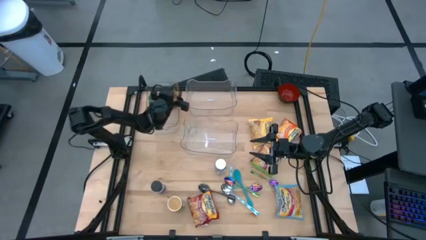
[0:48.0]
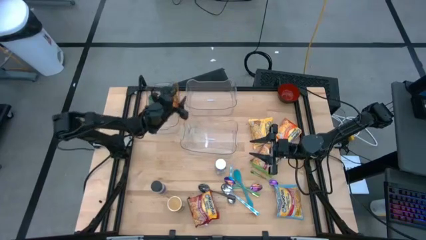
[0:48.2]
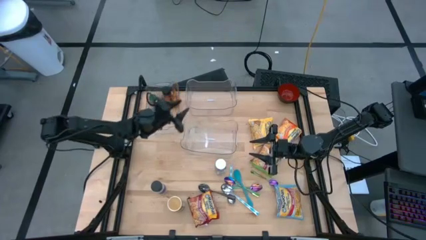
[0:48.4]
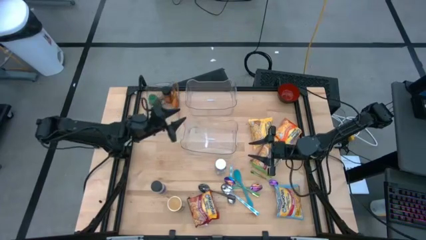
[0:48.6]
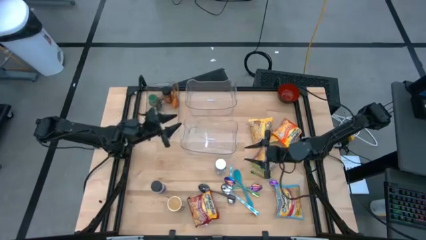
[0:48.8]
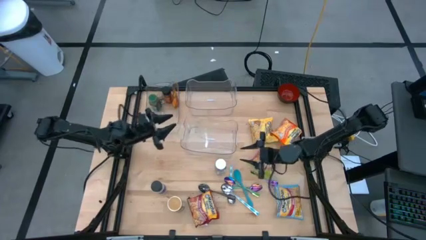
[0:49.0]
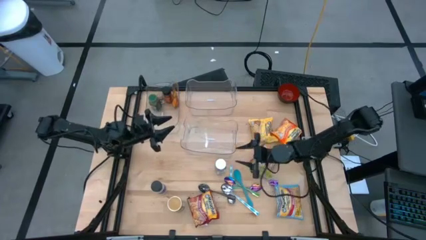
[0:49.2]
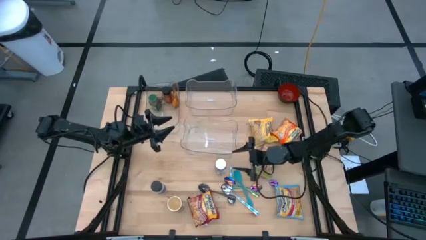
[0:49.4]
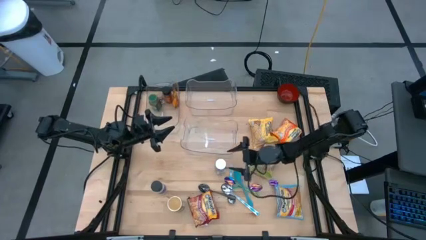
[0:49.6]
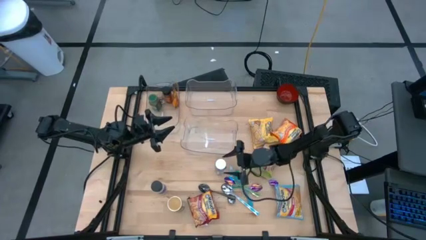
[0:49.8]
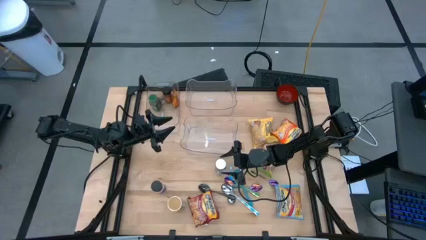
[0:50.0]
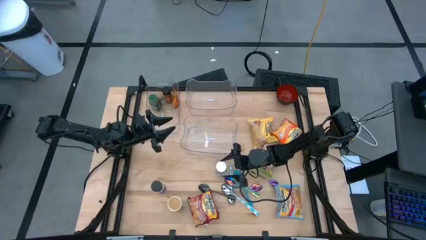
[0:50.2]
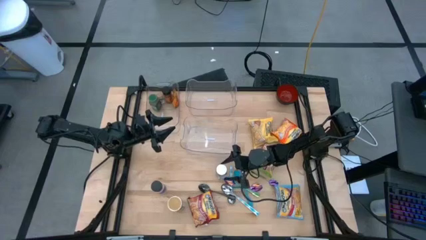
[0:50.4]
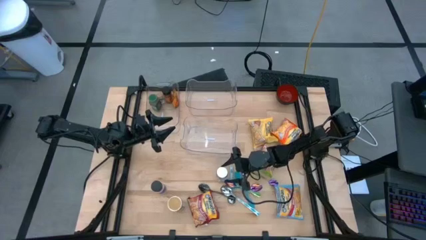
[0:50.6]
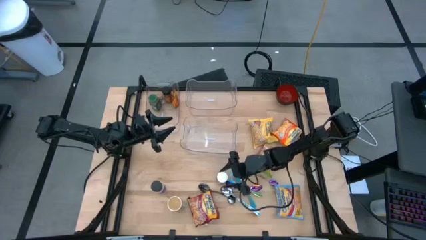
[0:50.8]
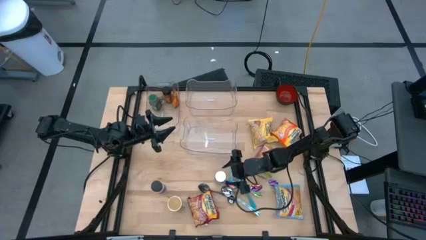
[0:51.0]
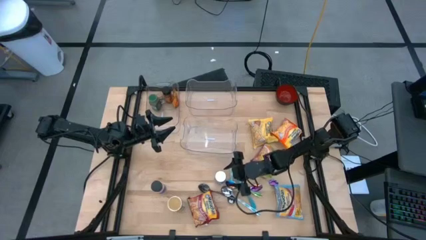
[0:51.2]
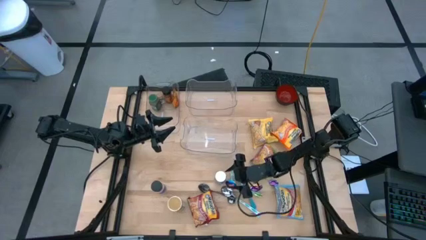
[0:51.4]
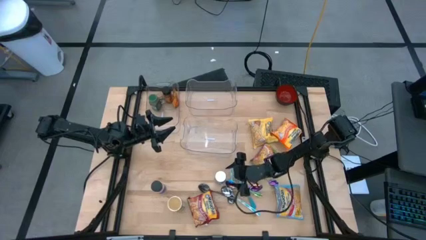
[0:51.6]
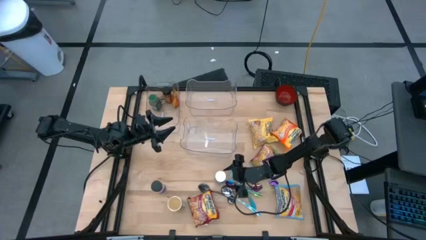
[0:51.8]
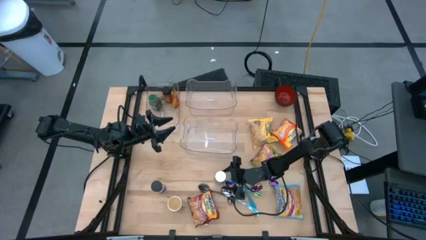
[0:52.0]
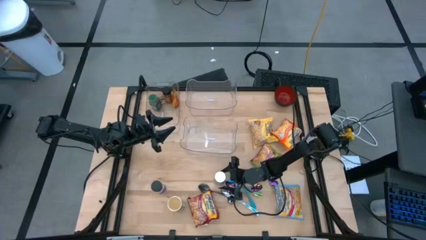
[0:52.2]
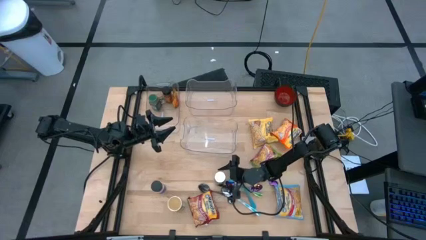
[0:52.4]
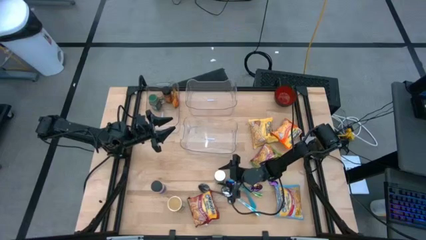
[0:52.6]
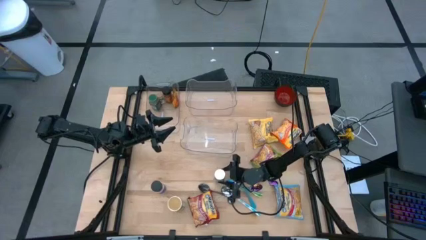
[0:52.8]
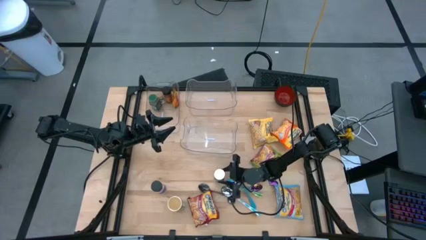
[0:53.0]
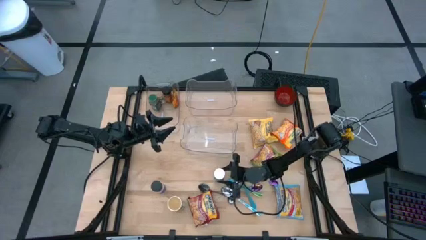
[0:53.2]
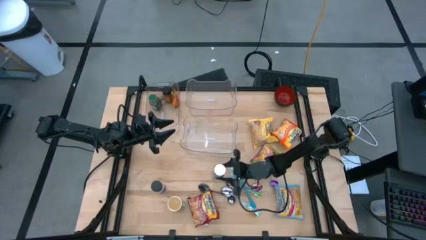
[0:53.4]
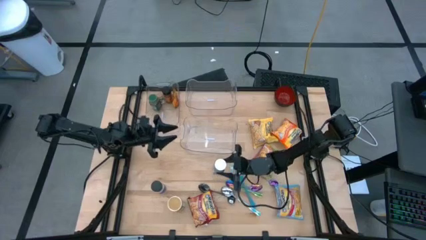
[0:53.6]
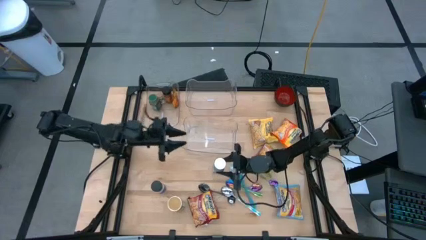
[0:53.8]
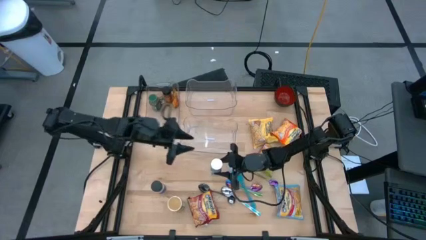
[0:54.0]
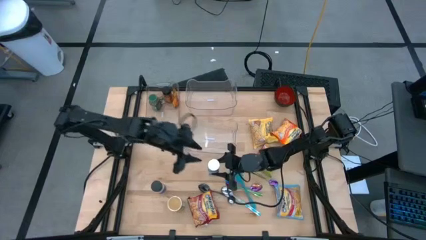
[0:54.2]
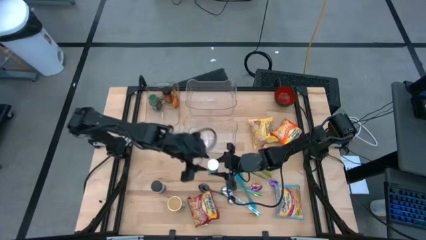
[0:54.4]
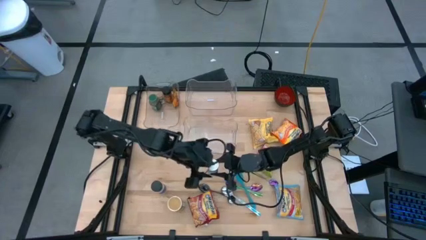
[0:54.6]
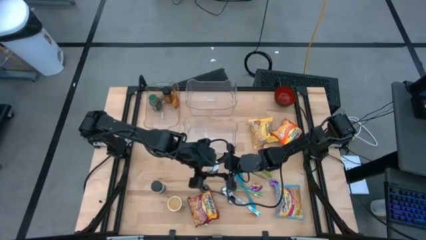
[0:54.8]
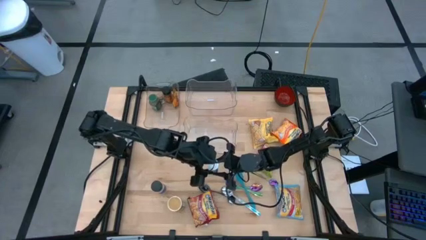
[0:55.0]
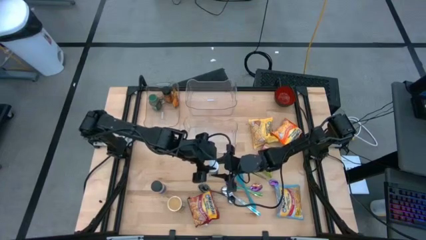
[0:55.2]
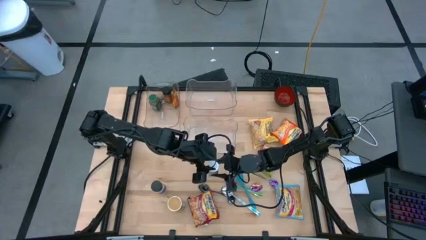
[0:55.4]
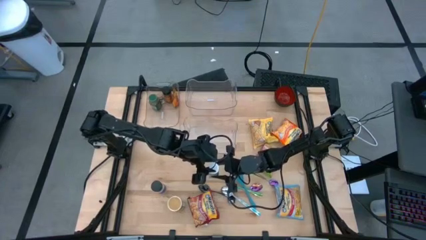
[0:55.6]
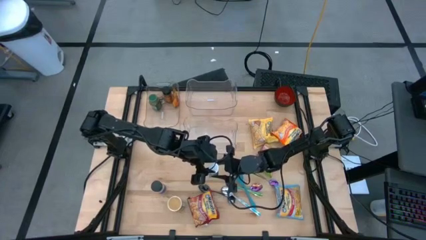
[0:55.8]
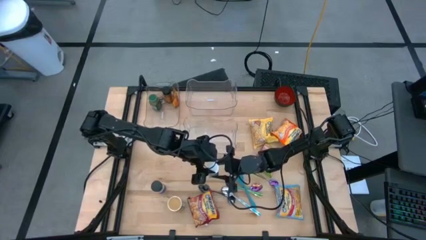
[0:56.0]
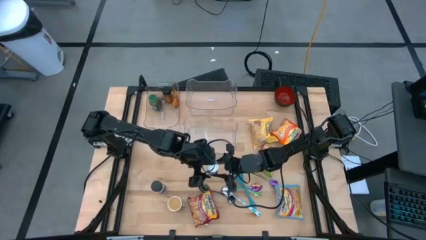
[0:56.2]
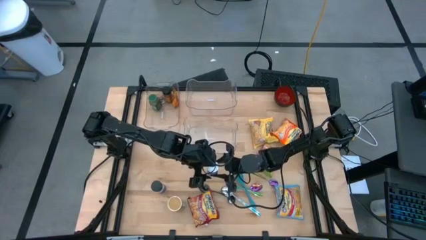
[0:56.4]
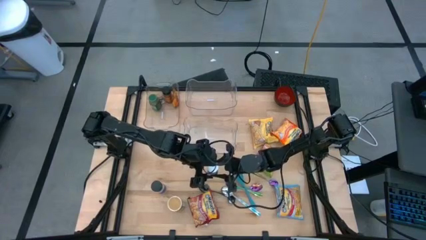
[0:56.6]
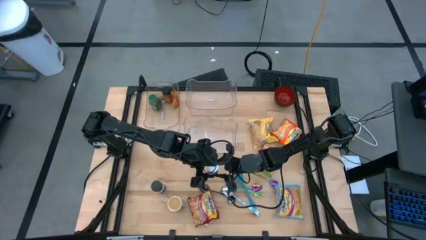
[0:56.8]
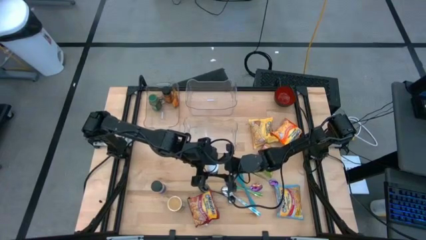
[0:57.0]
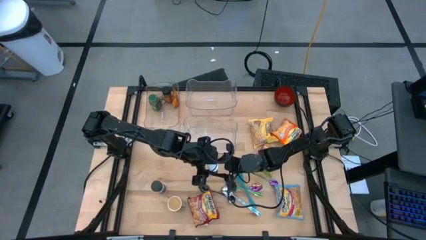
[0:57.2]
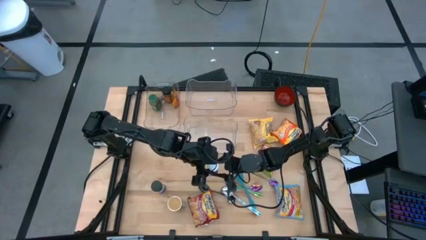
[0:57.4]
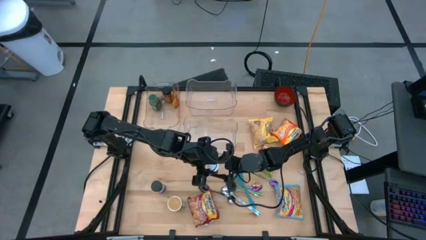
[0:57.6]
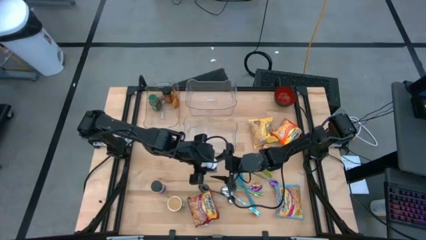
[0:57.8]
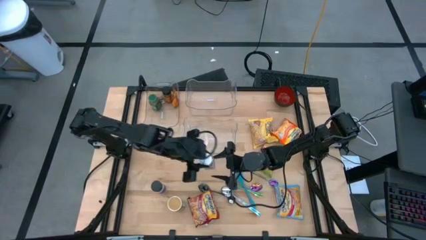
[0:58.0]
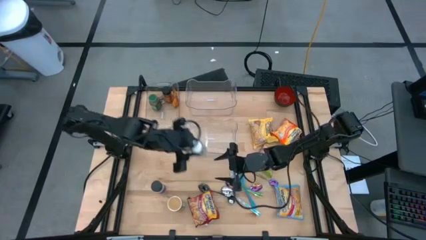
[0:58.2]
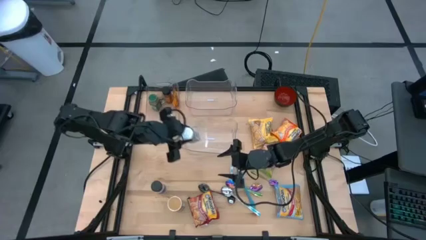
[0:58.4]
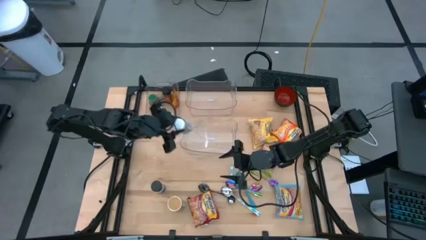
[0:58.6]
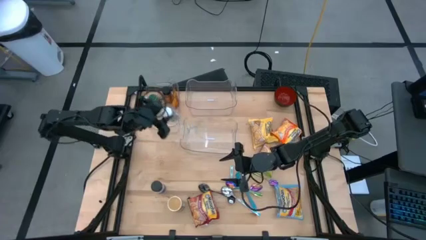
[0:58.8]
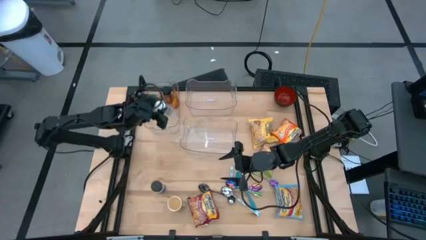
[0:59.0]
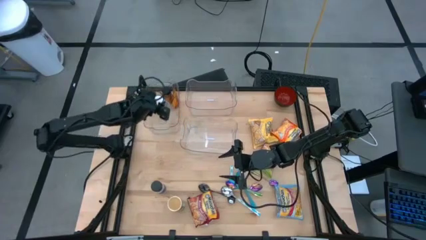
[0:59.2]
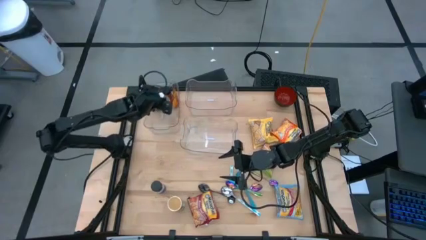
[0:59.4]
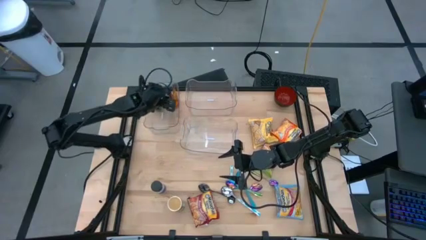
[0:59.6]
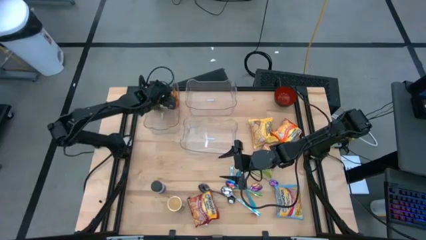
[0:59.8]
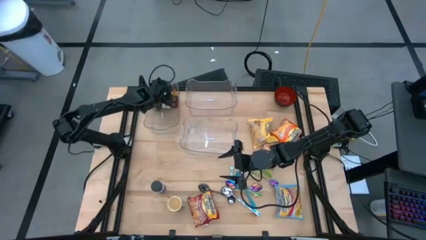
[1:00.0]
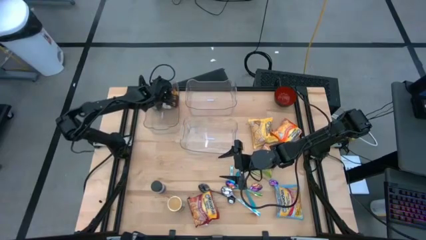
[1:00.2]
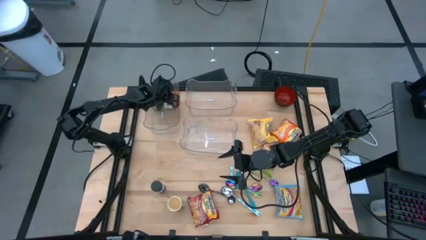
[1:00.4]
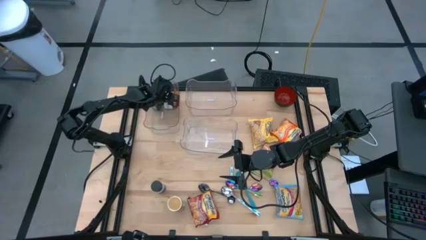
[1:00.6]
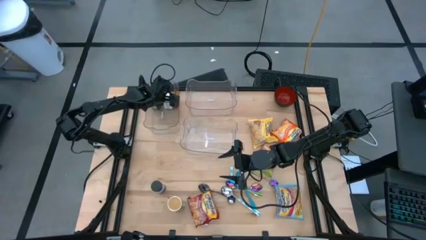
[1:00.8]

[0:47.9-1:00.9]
Task: Pick & Place Food Item
Put the white seasoning bottle into the top left transparent bin
